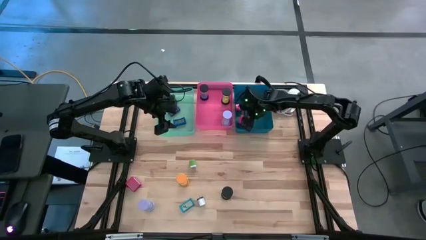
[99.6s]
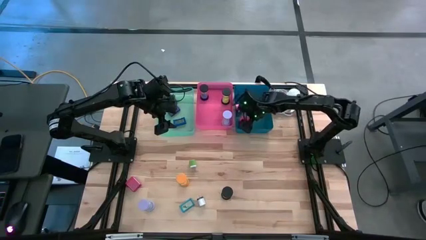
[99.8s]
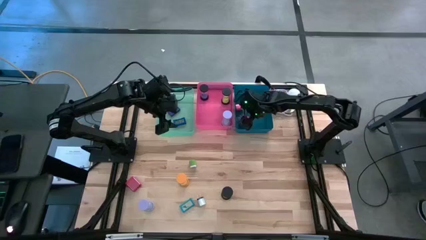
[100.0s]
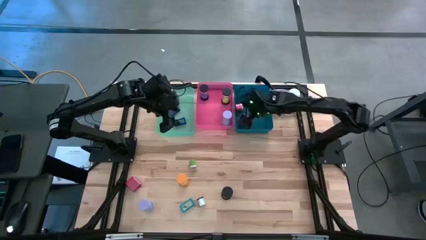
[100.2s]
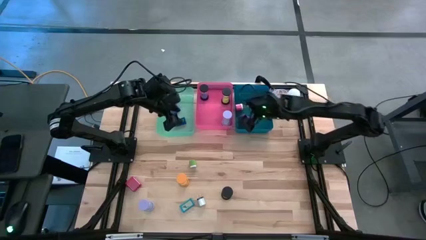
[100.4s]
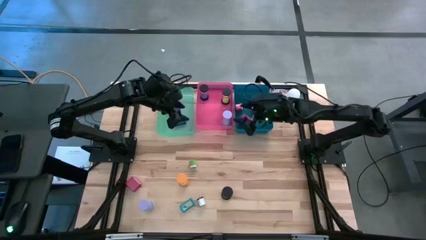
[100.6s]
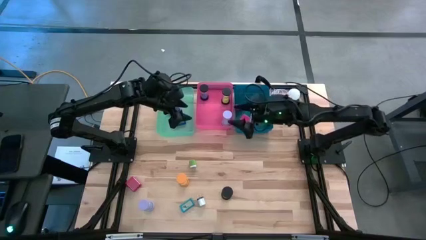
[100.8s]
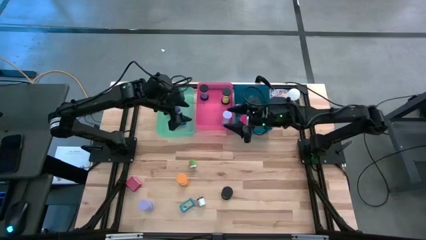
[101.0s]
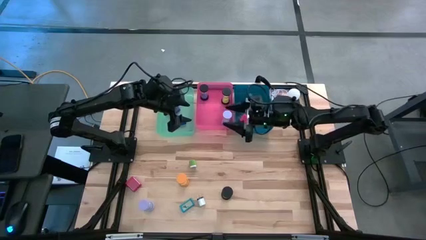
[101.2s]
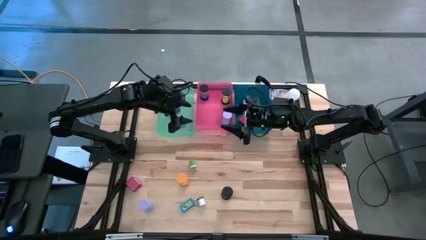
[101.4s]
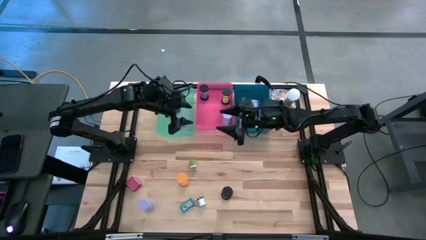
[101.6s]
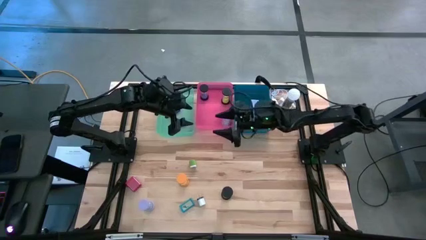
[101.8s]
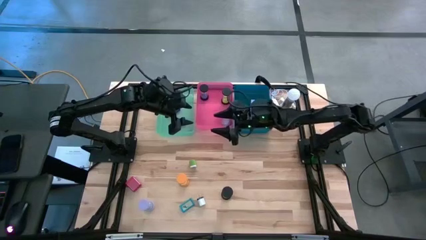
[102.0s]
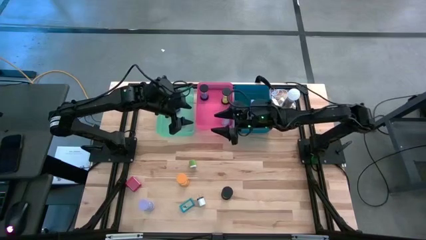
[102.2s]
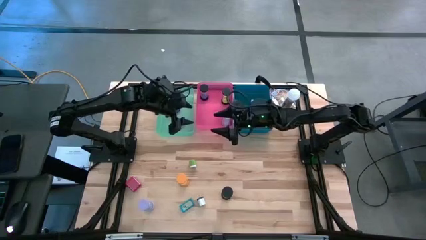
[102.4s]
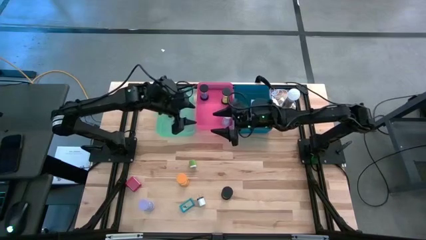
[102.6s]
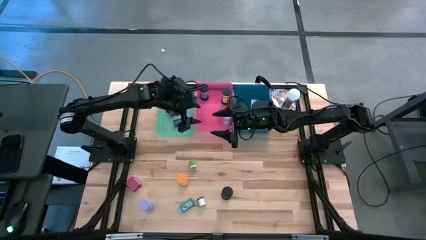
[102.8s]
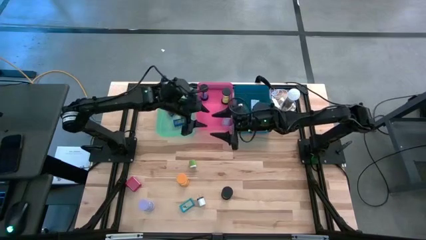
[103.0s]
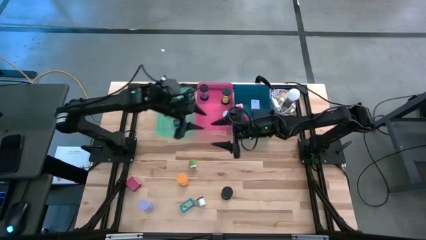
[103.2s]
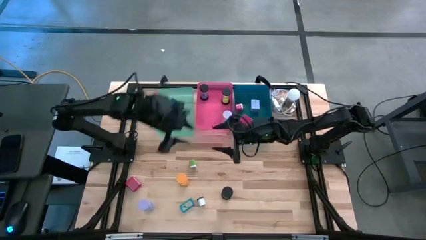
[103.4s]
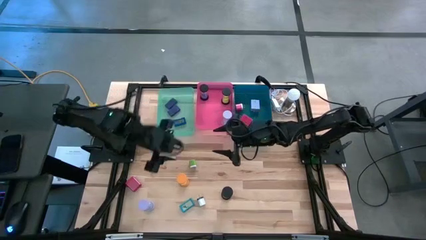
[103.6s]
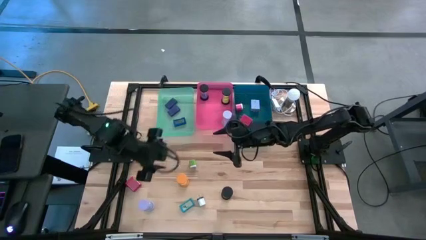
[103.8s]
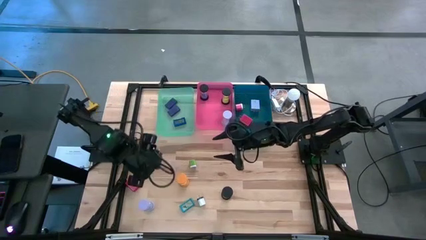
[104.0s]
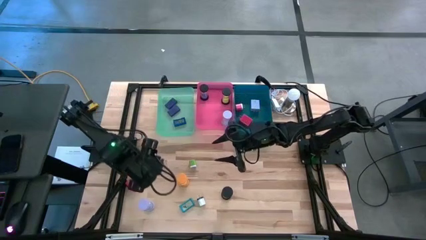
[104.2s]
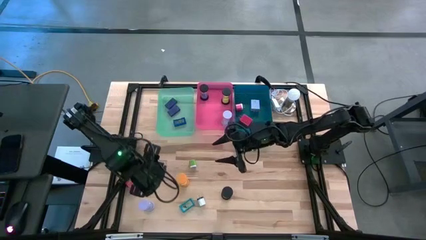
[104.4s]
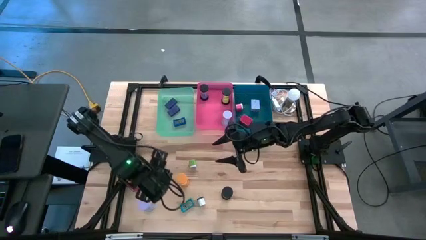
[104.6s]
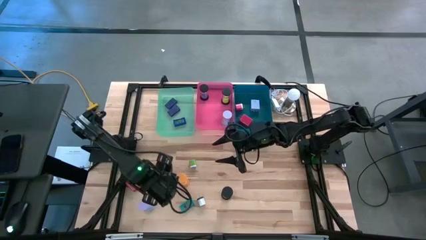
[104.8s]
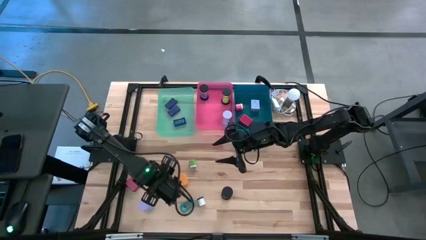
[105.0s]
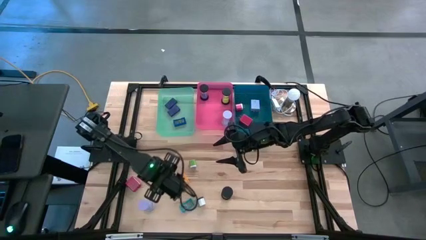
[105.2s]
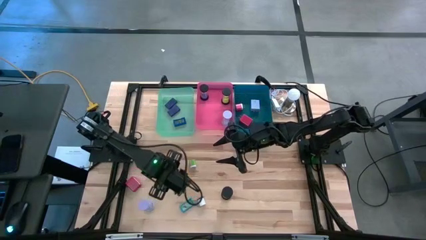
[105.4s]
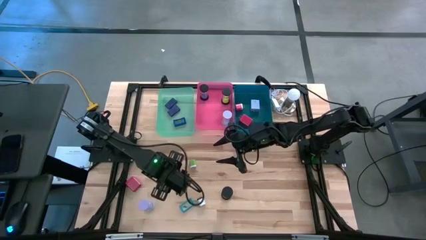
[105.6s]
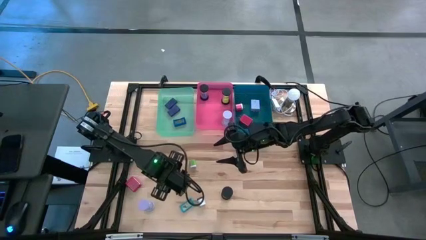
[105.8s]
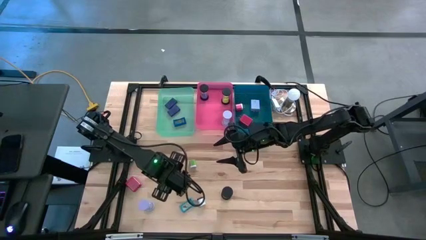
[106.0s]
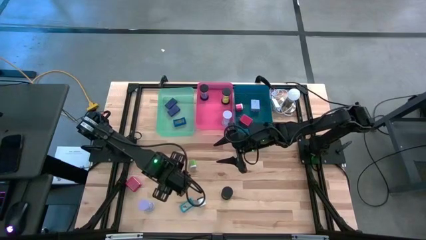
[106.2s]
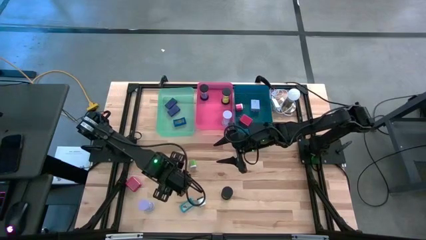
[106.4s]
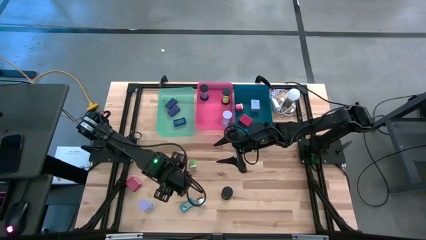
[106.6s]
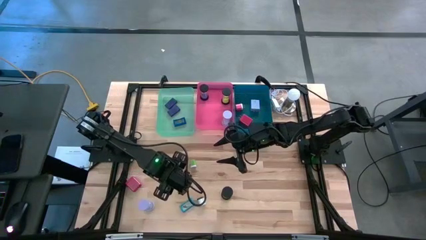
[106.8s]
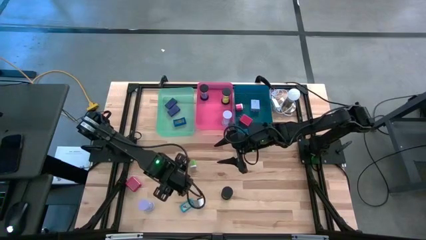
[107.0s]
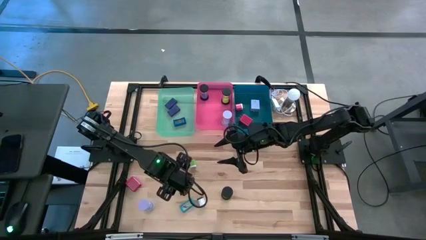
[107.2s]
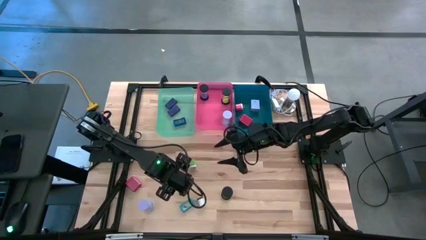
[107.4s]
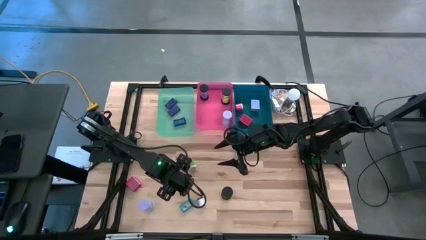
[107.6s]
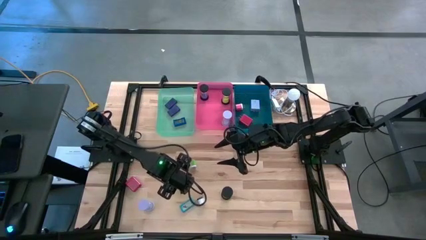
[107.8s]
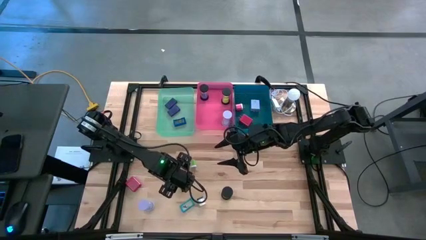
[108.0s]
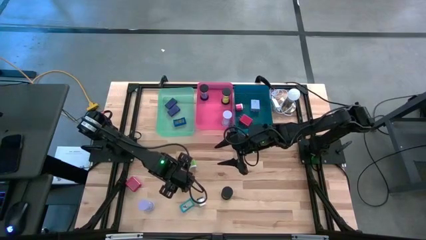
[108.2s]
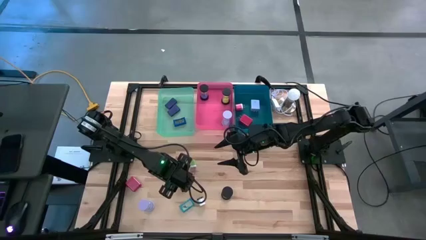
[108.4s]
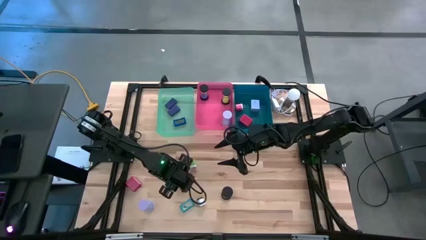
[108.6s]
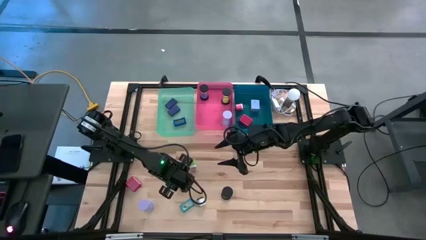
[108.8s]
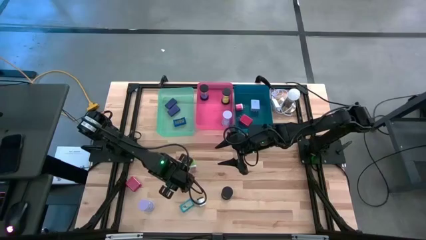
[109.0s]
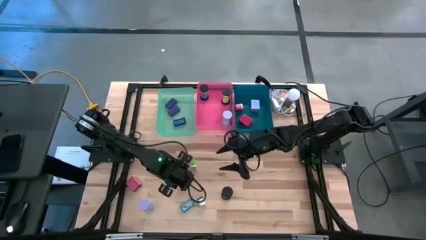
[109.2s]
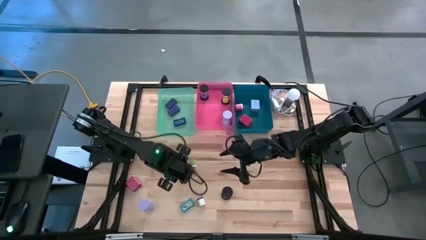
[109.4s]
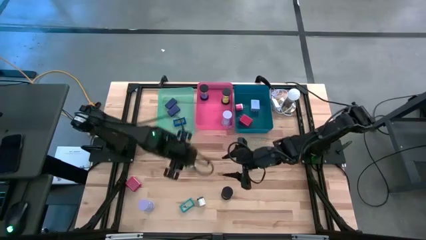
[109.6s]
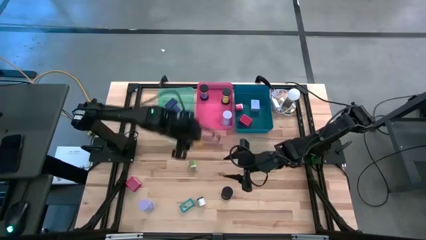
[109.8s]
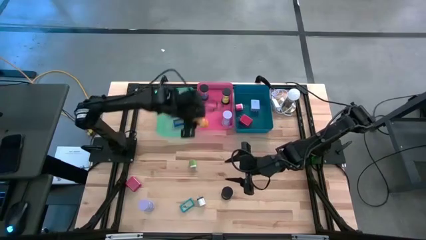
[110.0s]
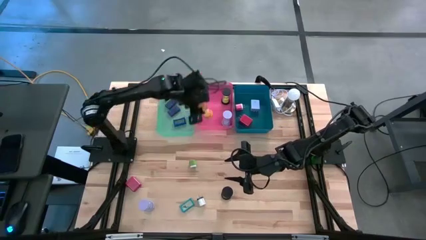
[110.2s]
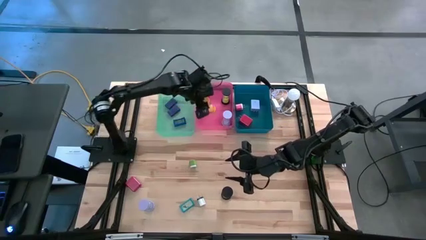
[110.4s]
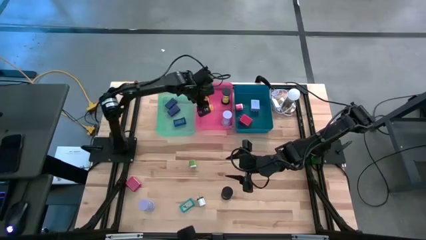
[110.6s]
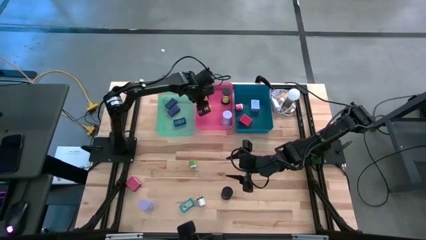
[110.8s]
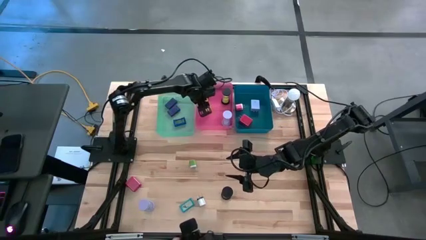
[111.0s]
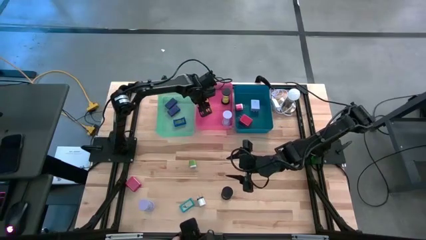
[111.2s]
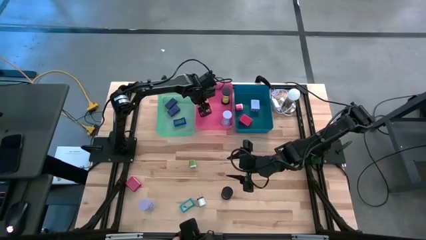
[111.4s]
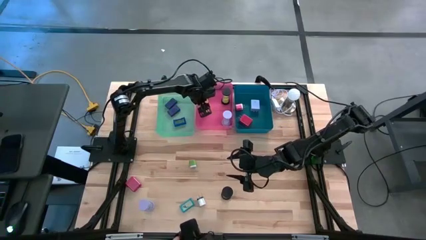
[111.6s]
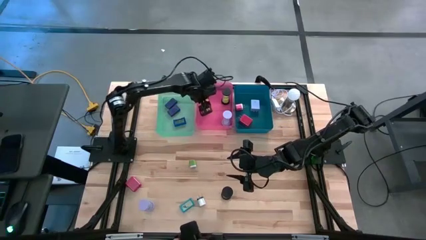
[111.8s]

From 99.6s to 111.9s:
Task: Pick & Place Office items
Put the yellow hourglass into the pink bin
